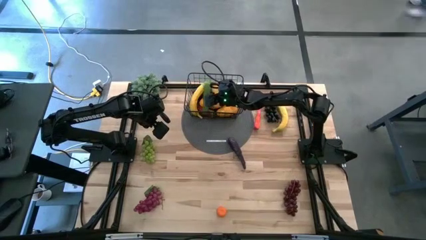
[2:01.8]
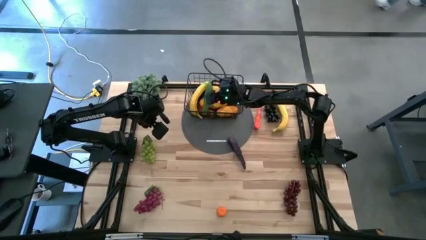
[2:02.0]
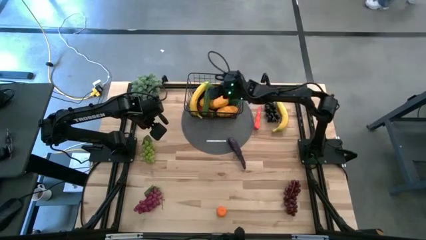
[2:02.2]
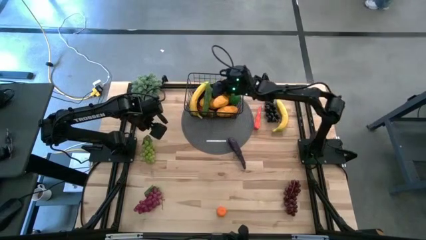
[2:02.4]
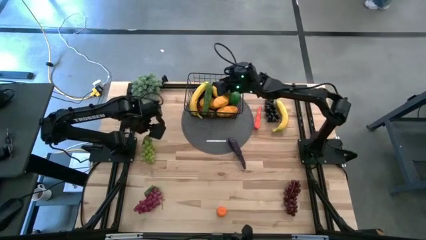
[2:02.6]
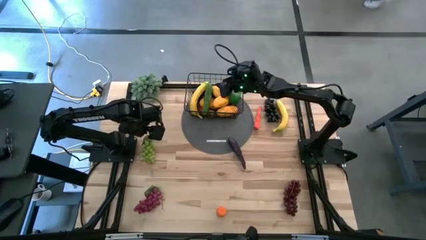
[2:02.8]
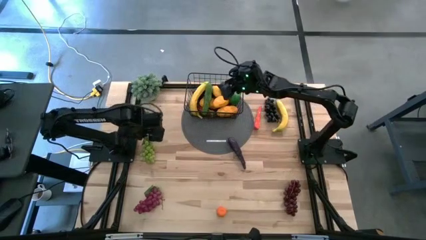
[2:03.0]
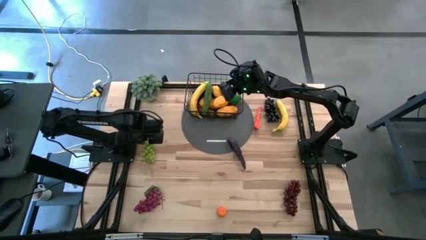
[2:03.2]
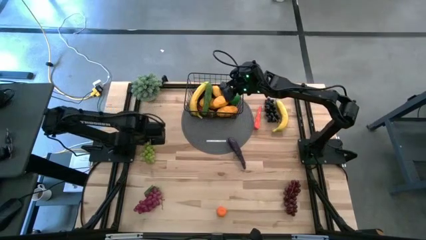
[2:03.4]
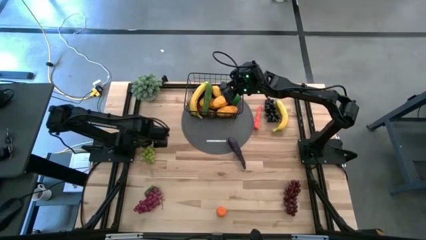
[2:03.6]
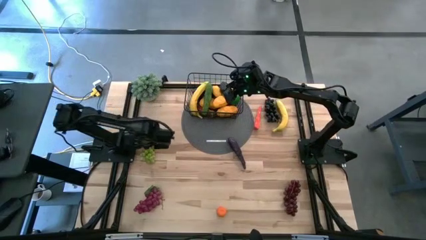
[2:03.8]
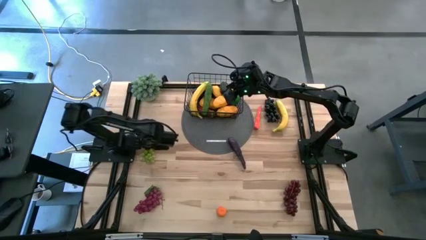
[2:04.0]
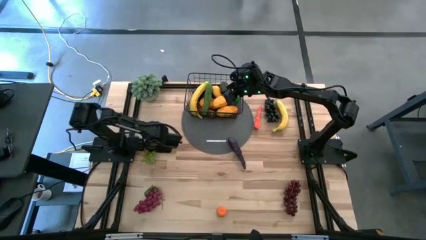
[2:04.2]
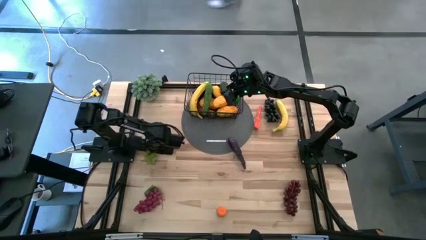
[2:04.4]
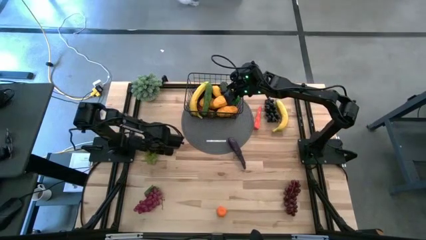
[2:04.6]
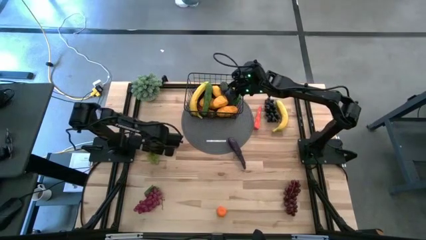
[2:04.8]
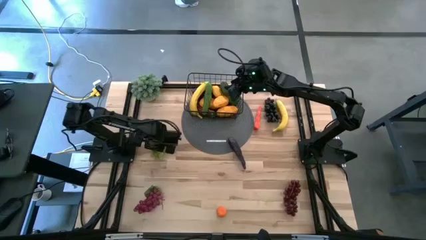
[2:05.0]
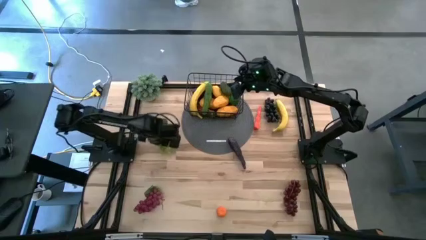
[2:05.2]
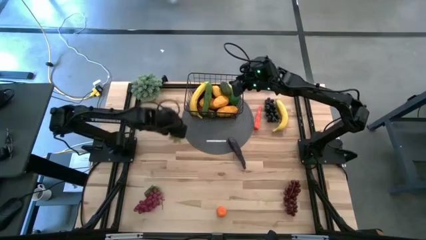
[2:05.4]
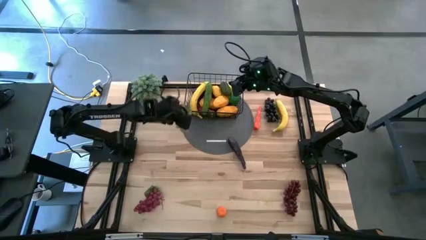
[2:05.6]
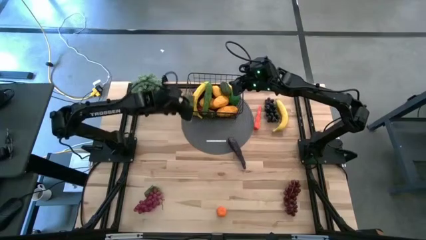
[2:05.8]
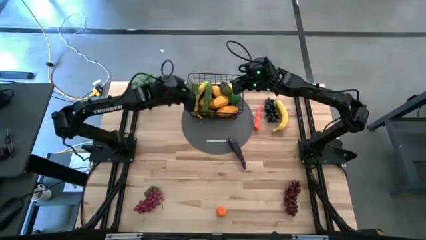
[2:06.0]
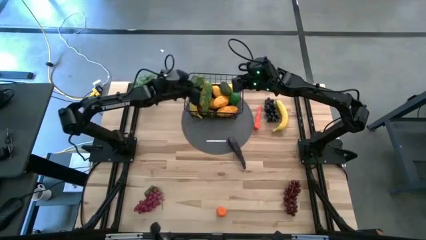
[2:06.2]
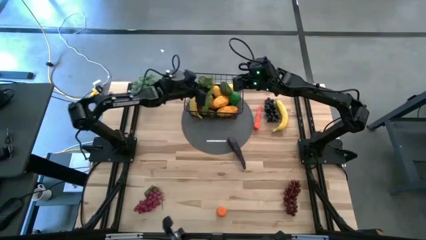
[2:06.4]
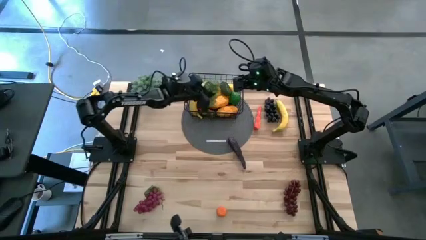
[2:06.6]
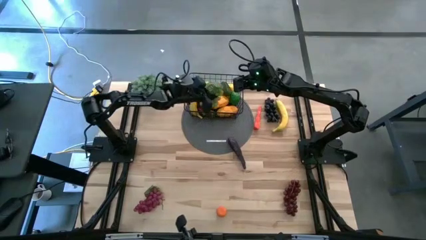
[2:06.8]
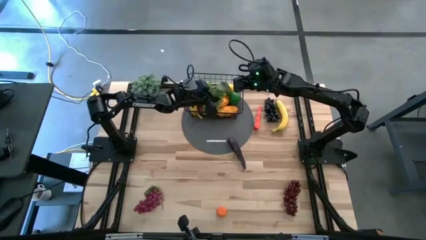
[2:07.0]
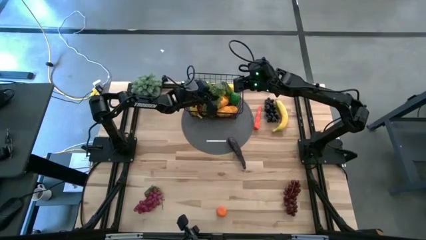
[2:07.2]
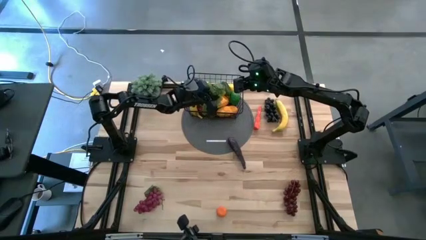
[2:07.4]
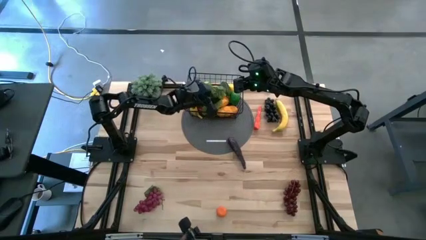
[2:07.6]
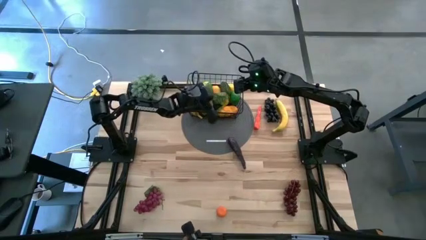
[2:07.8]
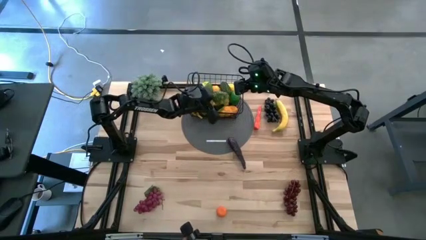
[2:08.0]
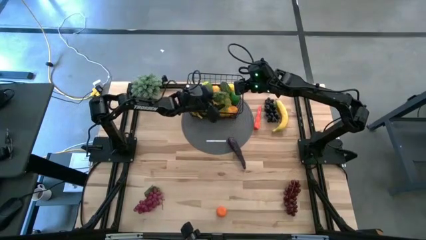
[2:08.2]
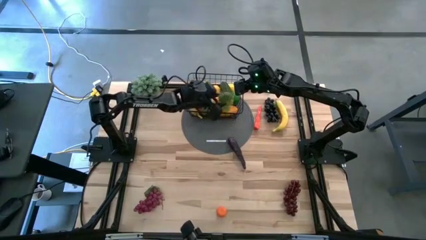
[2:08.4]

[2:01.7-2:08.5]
Task: Build produce basket
Put the grapes into the black wire basket

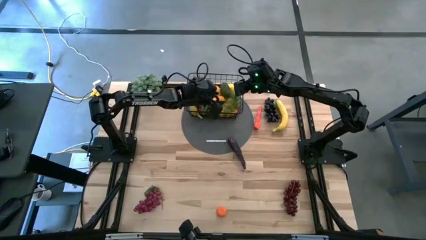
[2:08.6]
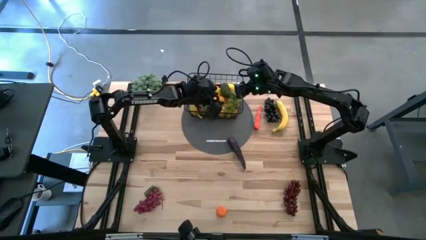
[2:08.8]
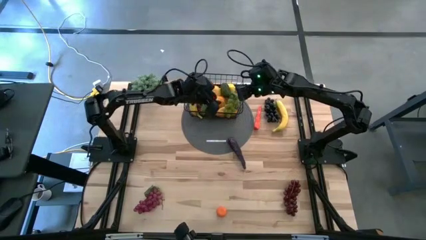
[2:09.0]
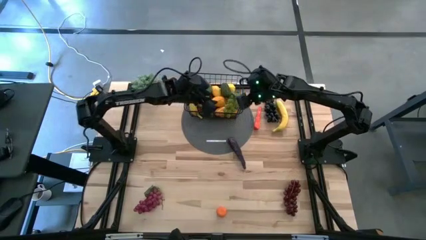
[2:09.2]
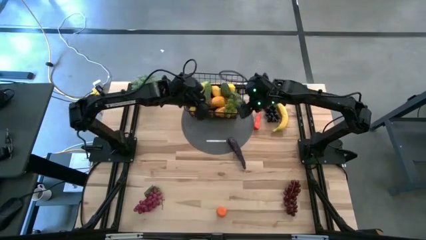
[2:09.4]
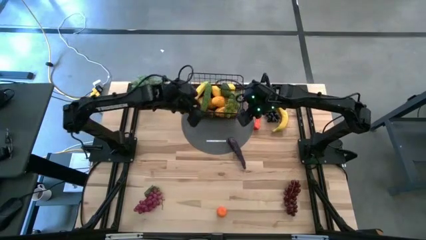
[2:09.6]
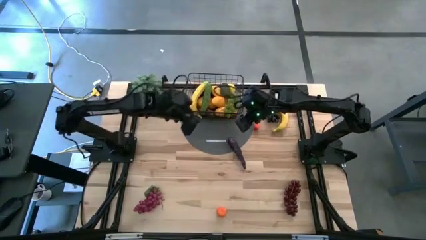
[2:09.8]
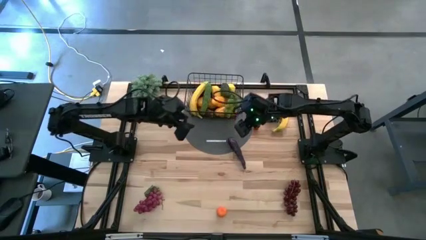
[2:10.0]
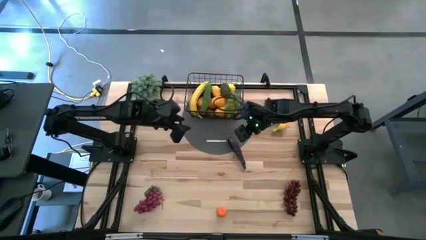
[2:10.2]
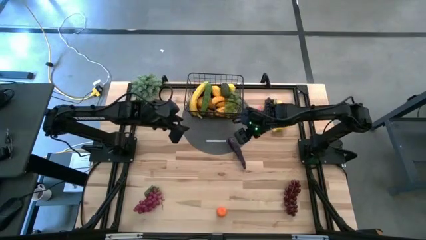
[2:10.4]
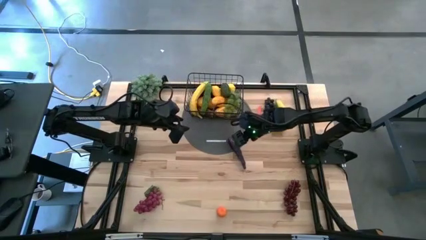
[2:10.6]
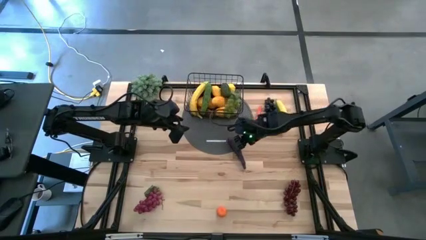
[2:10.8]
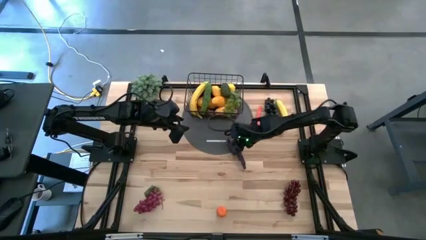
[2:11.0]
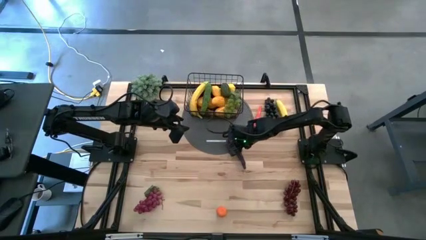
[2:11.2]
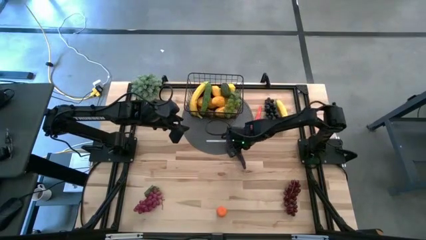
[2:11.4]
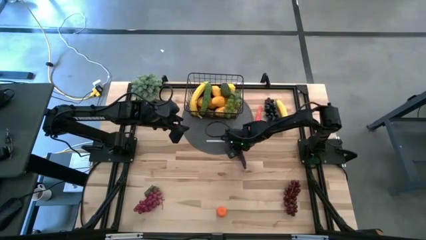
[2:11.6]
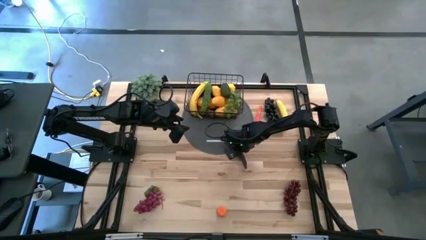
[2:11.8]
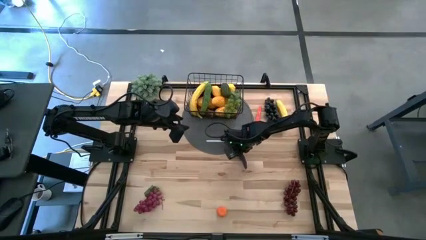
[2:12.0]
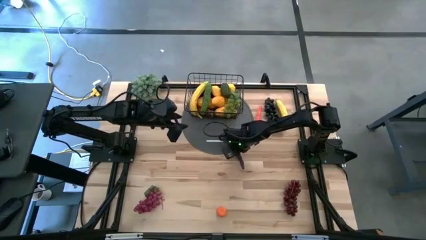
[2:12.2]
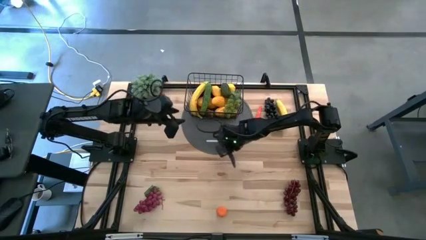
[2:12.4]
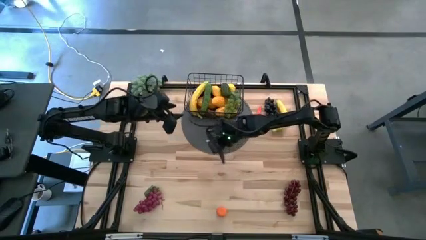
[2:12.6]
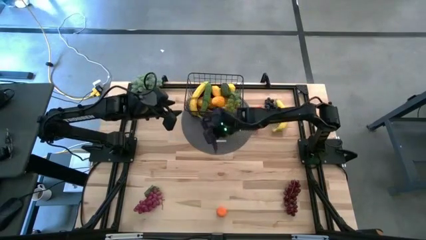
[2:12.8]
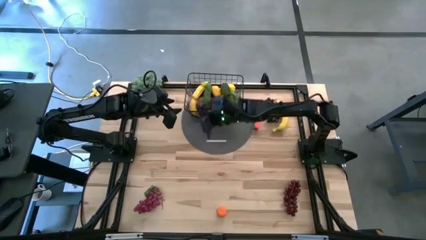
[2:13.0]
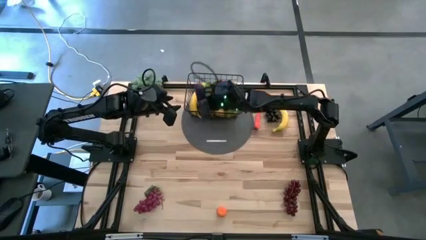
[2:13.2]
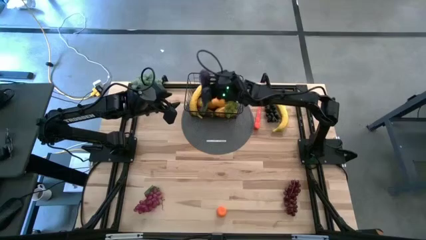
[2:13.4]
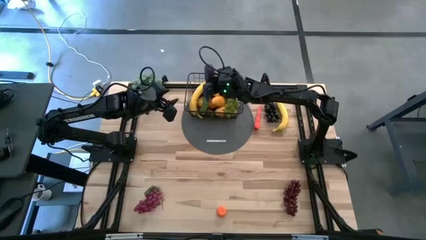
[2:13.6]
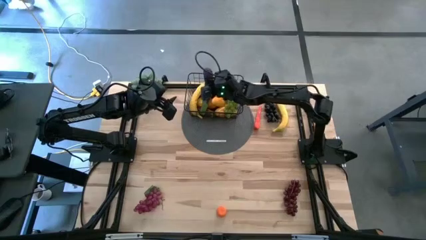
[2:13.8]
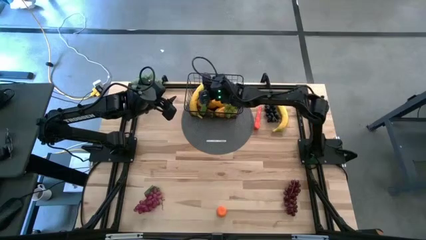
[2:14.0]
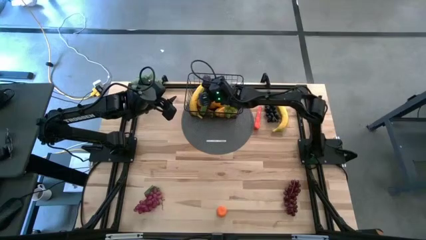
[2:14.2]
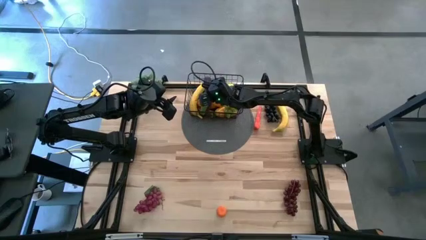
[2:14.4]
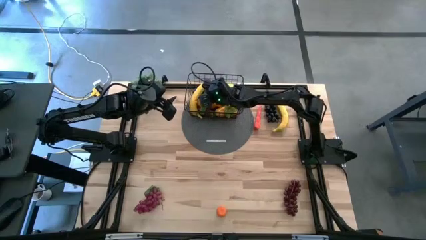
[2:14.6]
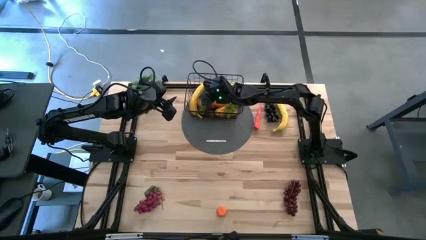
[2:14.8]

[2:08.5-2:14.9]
Put the eggplant into the black wire basket

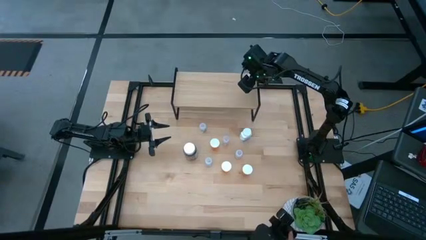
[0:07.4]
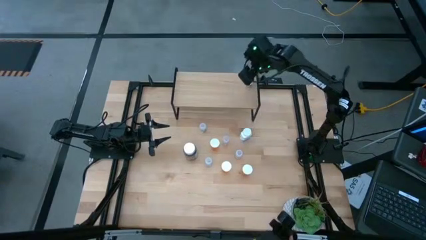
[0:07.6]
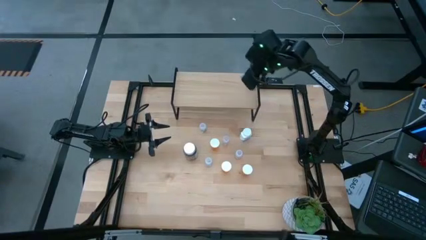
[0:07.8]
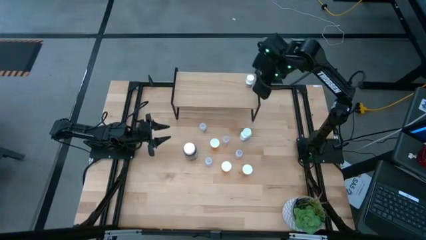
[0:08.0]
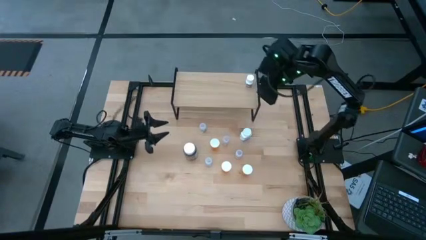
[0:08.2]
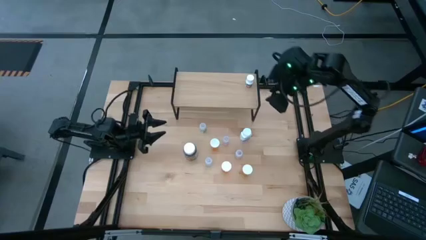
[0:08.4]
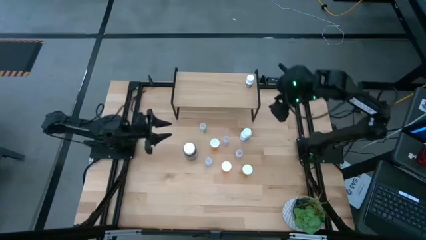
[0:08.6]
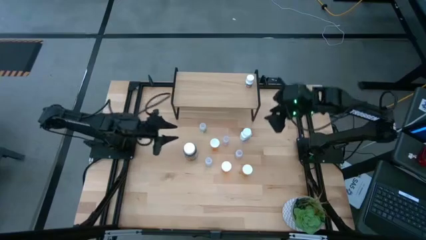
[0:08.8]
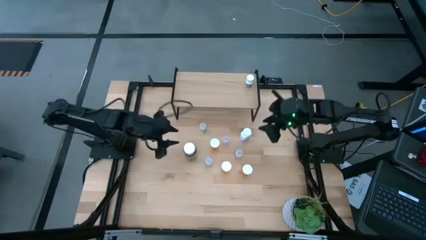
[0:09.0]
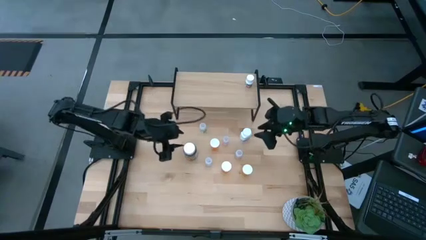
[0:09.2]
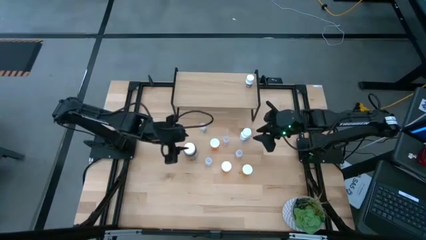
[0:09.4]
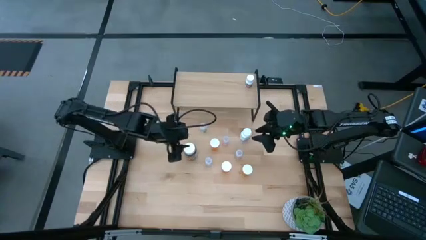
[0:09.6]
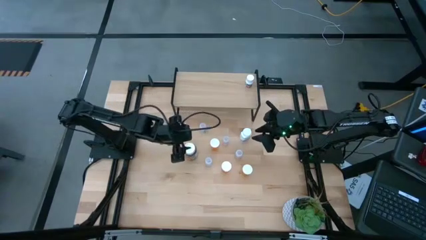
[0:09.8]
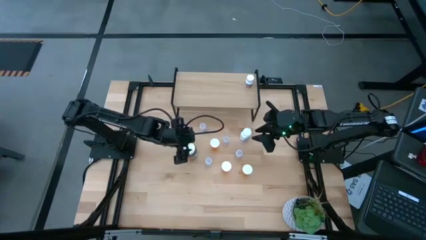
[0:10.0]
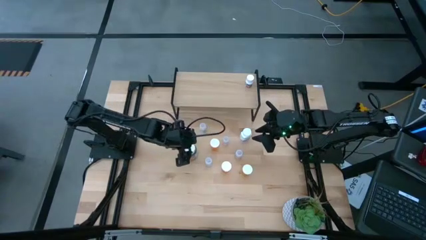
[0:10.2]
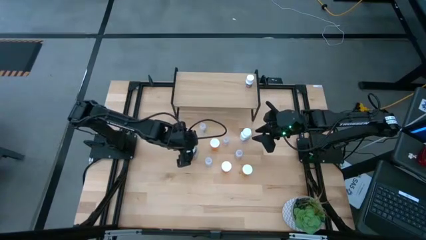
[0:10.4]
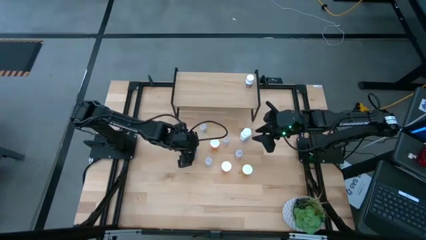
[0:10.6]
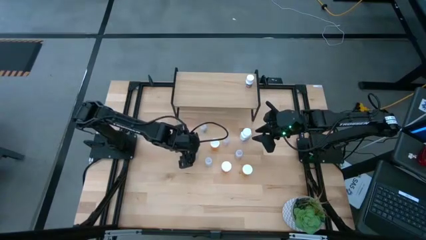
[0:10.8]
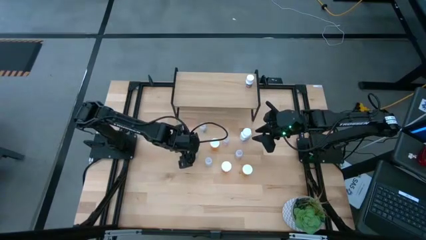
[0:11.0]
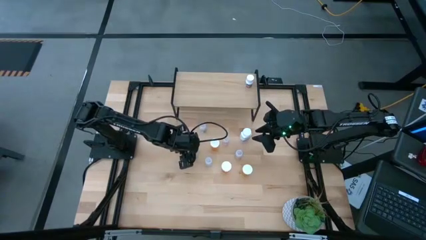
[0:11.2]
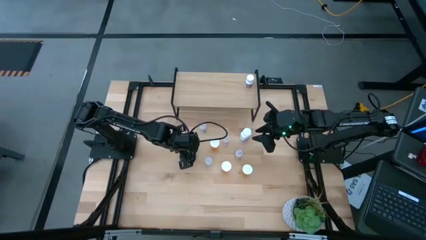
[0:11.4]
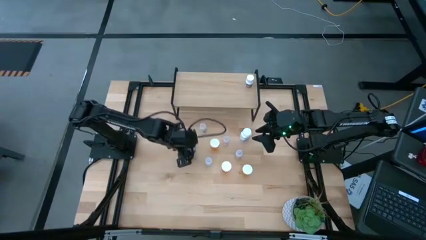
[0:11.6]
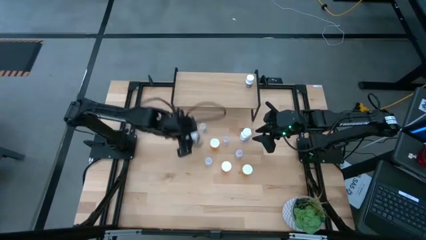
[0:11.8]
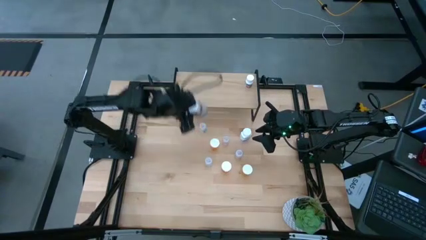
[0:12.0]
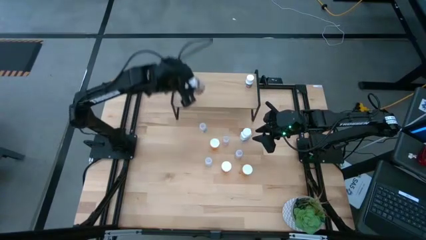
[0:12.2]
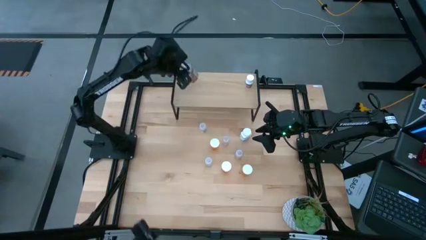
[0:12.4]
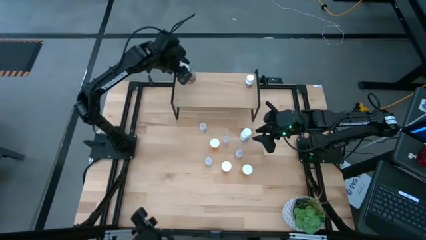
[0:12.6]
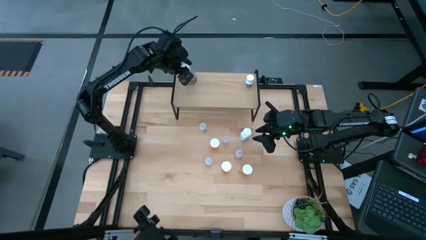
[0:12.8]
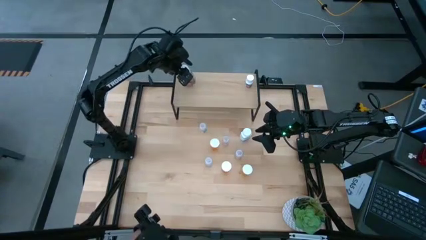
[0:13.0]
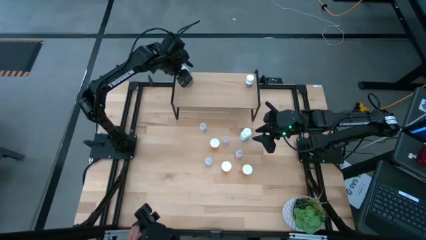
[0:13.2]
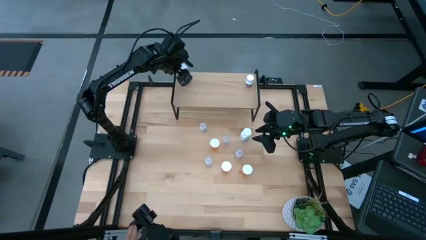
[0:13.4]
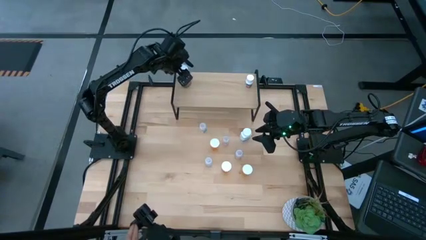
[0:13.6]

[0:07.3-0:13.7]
Task: Pick and place medicine bottles onto shelf by color
Put the green pill bottle on the shelf
